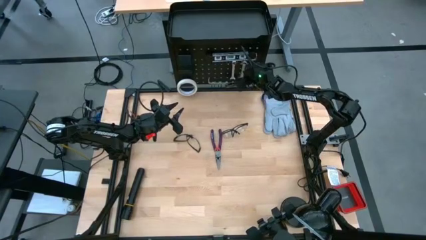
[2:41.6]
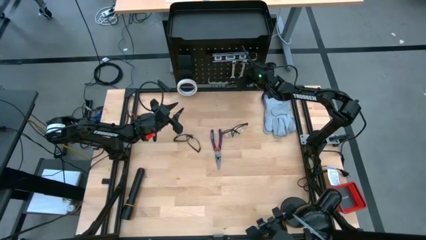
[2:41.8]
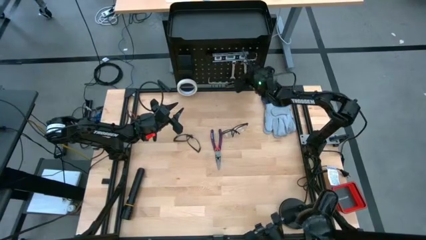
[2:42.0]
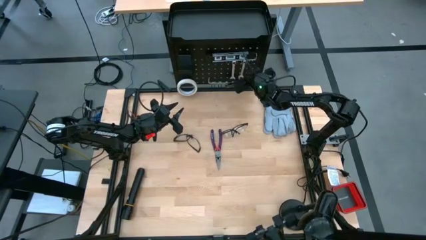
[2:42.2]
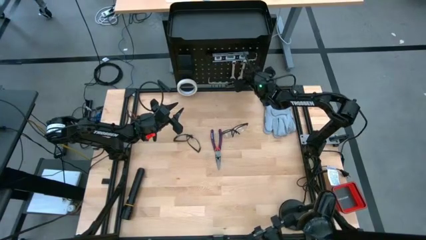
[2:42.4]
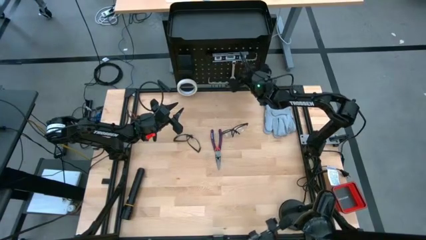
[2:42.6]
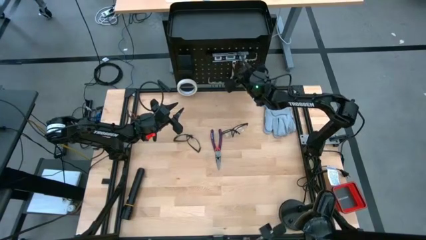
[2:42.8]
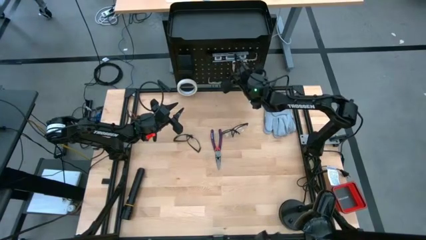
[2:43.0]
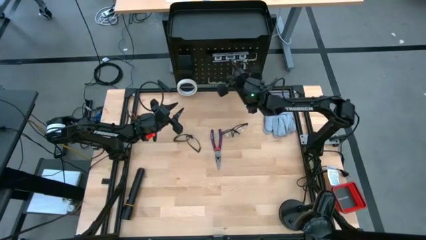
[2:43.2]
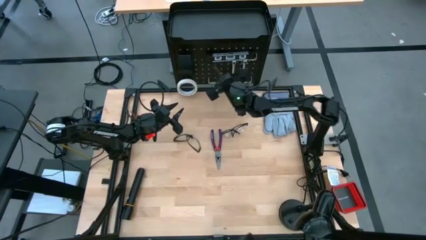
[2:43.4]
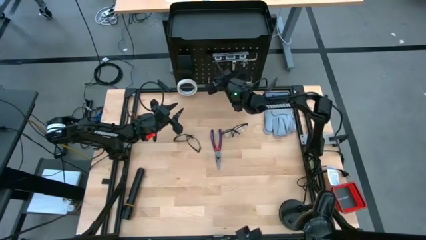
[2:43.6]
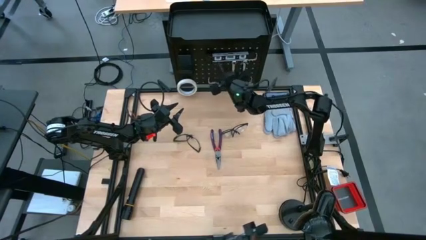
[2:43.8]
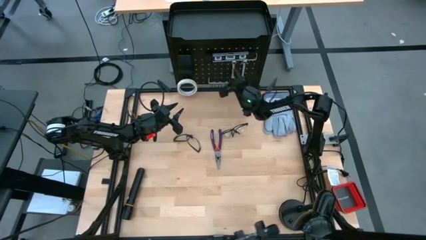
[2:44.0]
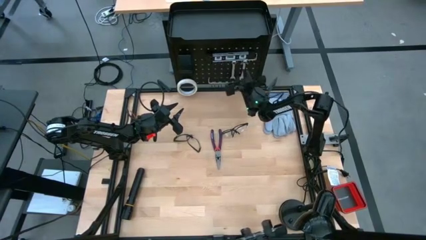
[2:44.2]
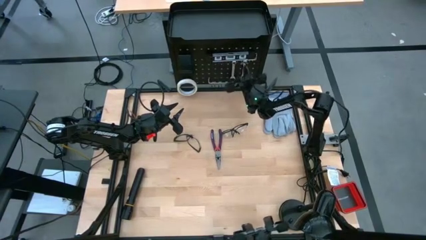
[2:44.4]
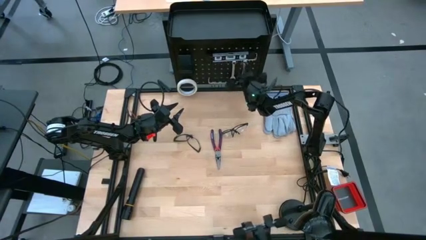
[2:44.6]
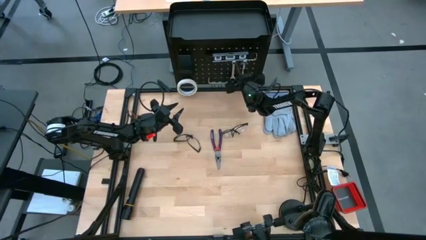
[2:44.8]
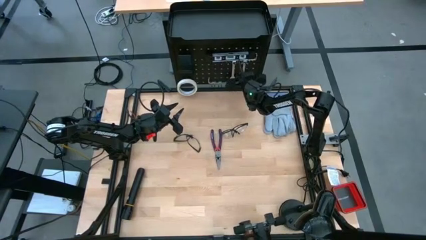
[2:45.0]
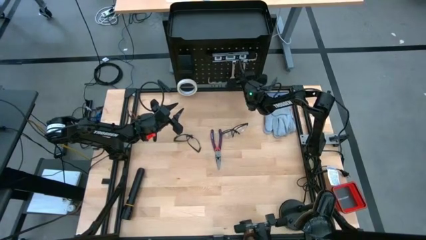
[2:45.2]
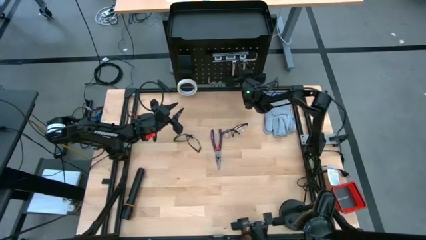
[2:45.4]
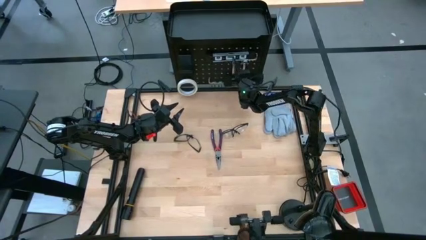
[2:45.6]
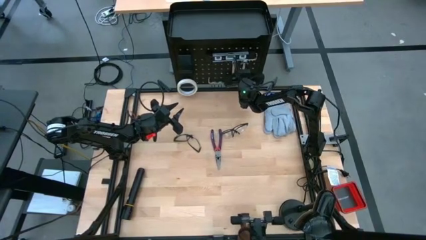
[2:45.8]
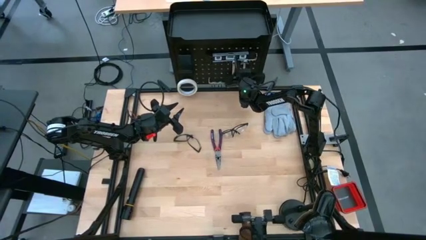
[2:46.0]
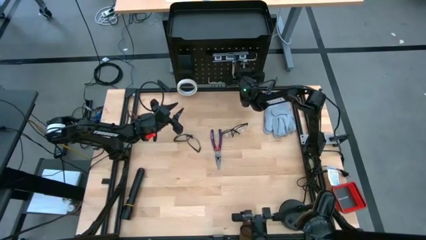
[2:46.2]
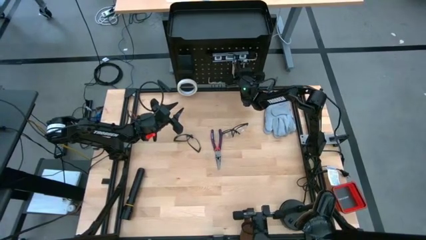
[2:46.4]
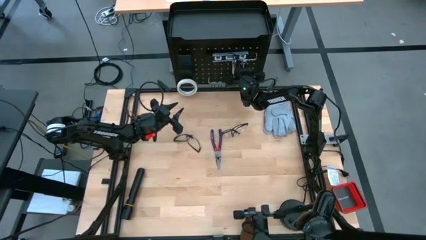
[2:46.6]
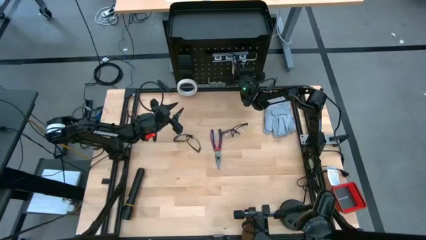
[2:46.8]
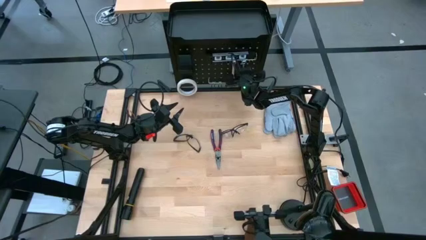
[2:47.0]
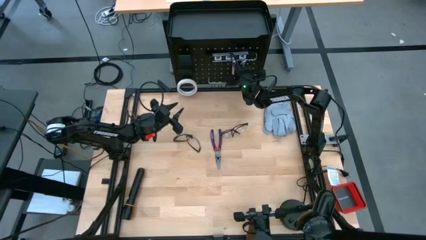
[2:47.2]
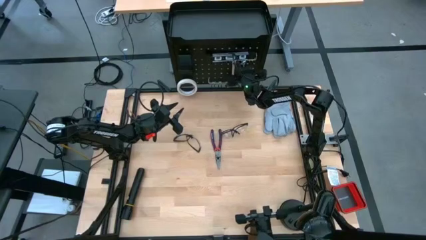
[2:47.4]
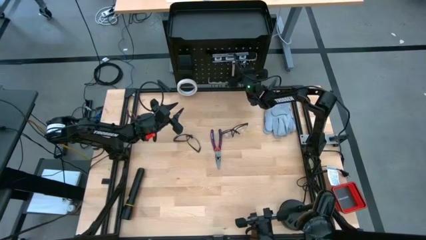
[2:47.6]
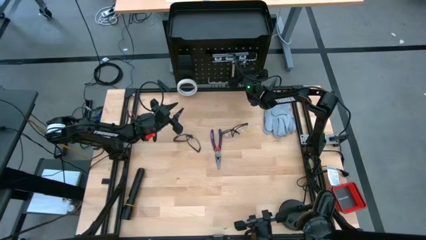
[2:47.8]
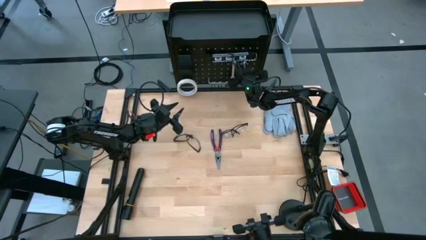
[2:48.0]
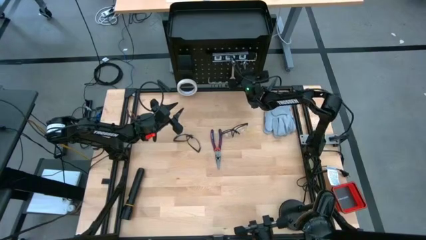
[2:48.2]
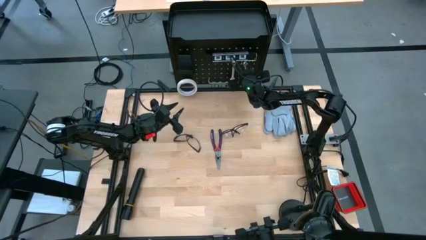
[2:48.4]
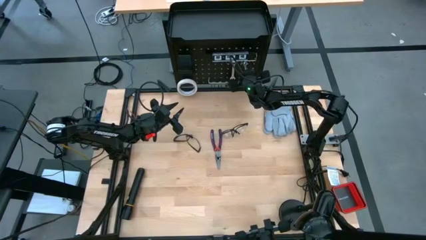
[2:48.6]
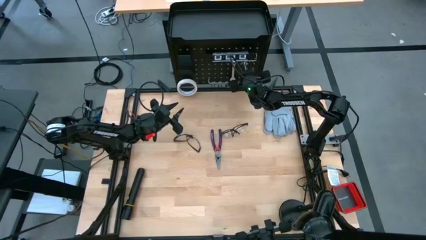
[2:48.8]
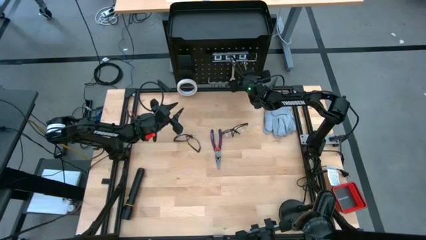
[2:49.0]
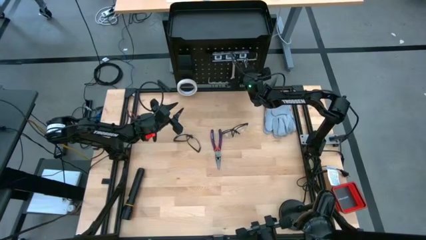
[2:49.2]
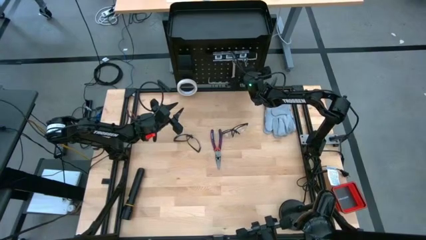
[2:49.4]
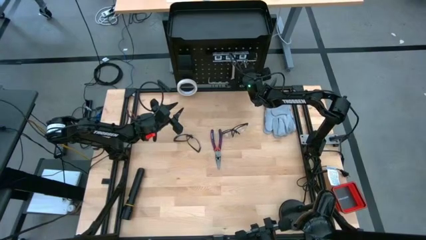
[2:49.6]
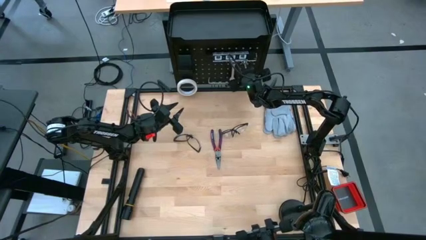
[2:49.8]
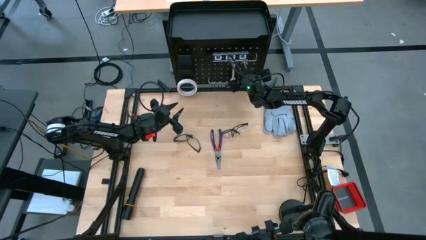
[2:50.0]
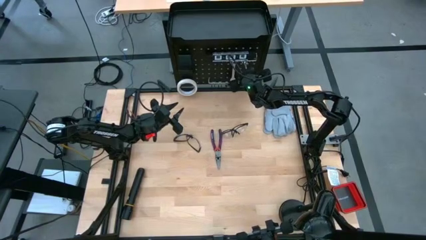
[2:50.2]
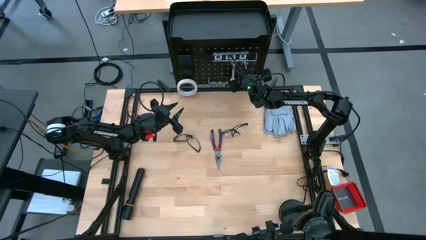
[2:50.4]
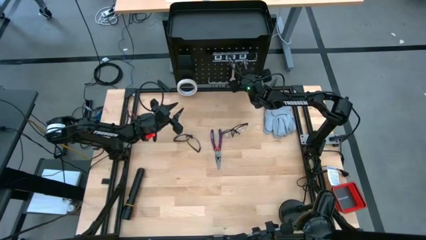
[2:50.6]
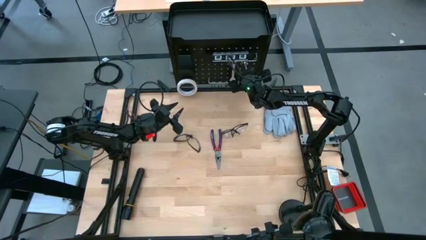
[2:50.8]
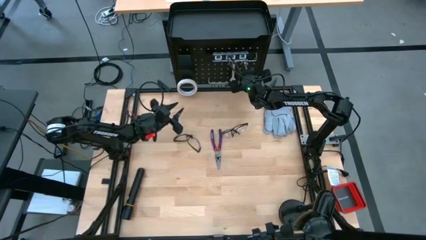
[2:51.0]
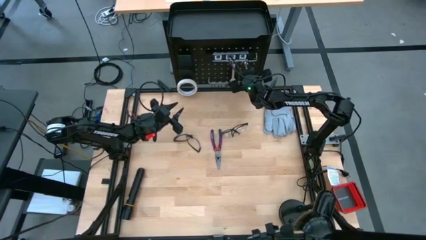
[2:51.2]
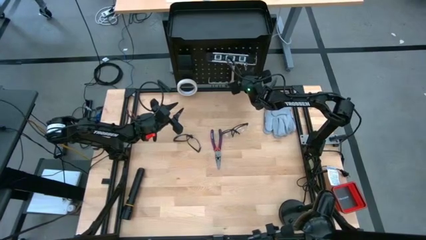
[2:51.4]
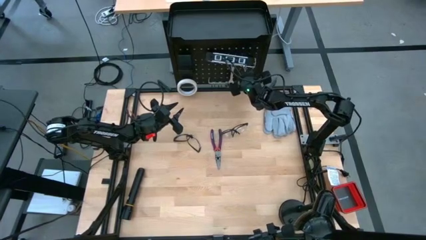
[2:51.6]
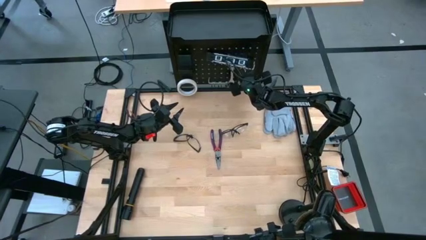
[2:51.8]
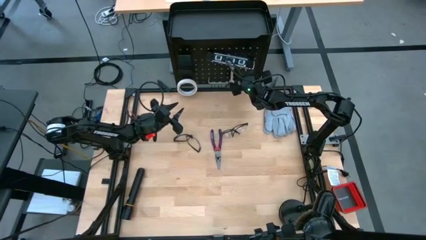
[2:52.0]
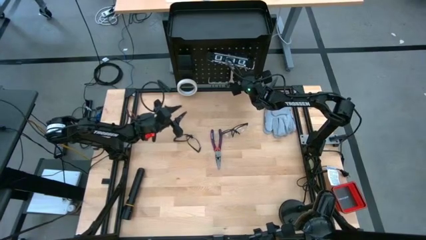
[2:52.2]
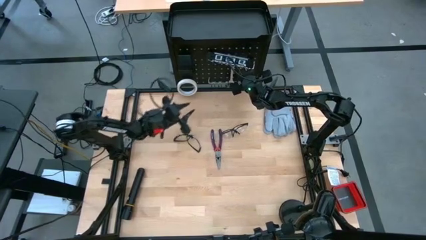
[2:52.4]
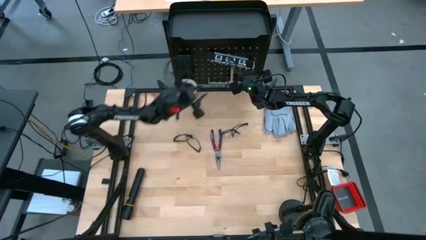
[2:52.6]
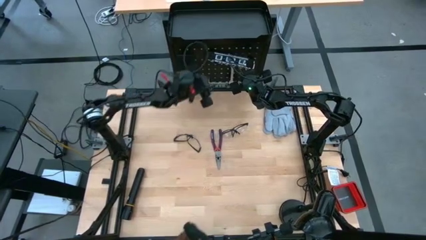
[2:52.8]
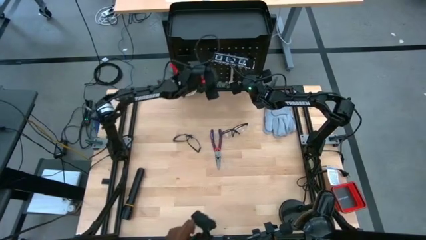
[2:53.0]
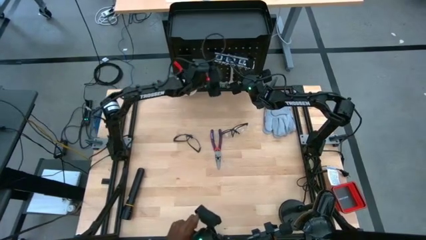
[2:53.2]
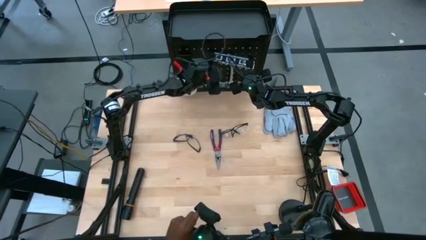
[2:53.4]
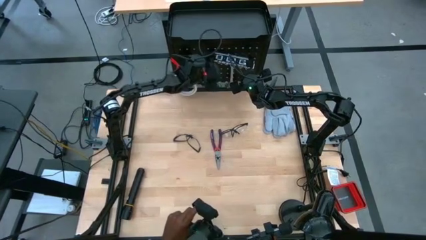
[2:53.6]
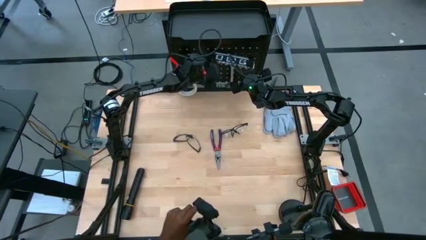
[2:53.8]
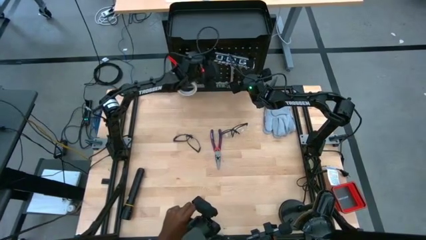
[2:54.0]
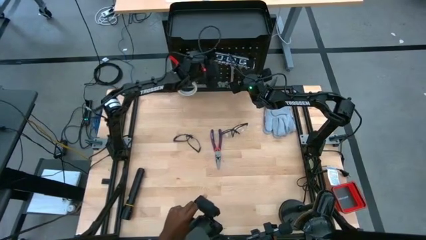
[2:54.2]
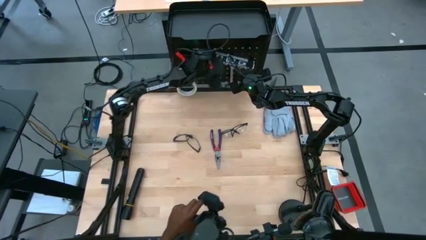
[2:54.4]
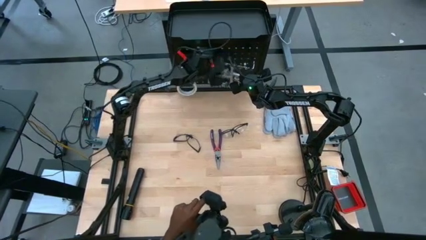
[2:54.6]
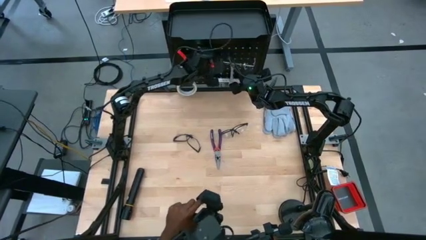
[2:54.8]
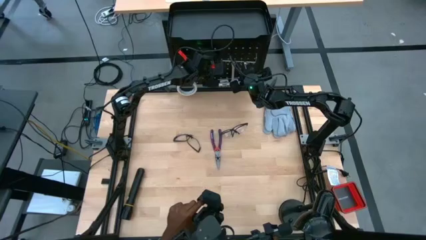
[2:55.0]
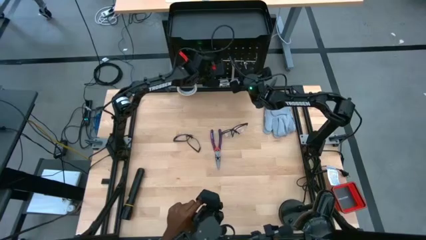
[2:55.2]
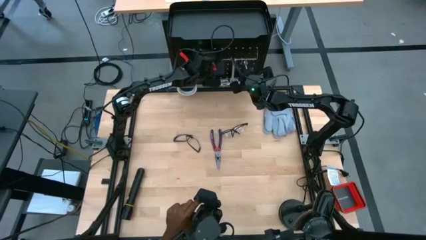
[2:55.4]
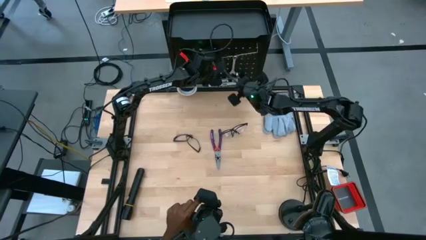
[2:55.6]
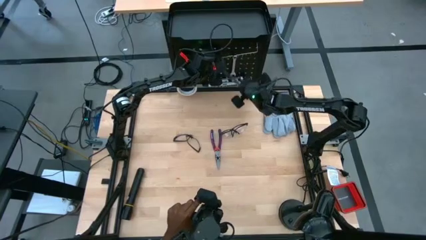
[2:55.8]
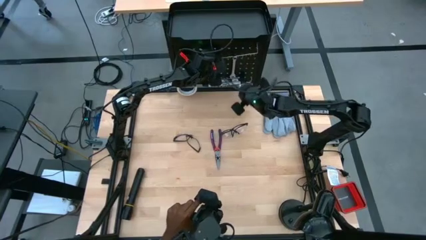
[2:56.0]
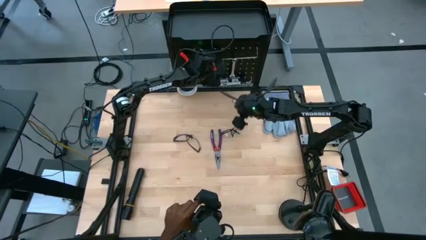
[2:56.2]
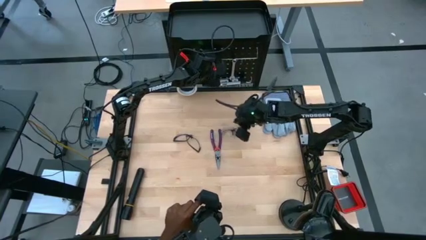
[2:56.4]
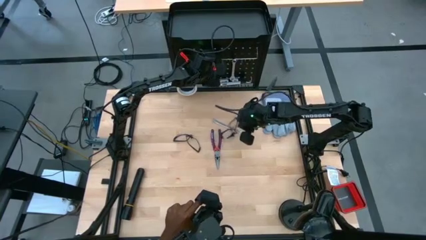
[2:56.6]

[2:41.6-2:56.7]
Task: Hang tools onto peg board
Unhang the silver wrench from the black pegboard
